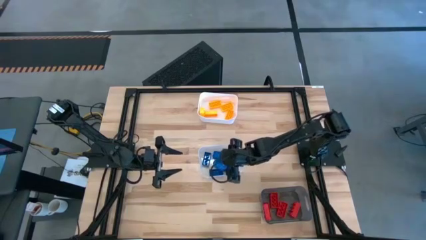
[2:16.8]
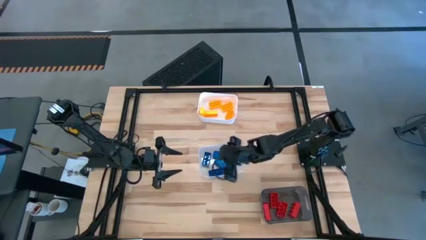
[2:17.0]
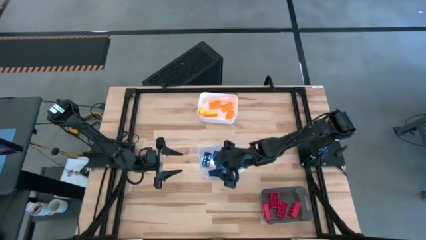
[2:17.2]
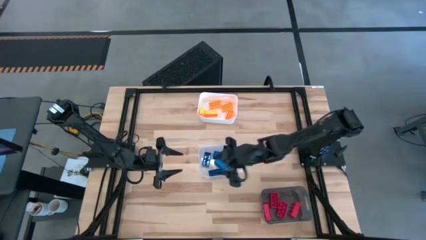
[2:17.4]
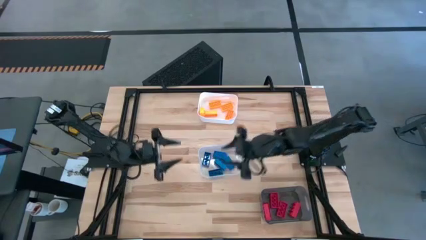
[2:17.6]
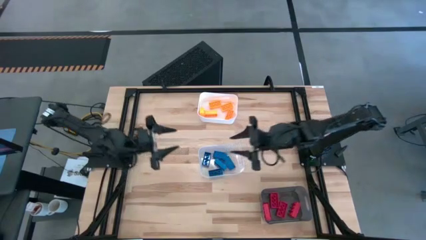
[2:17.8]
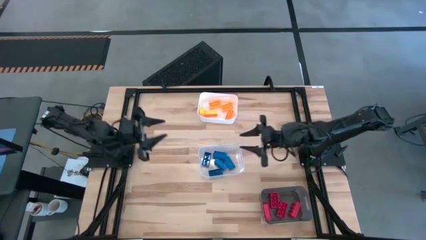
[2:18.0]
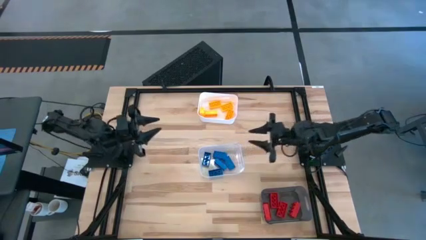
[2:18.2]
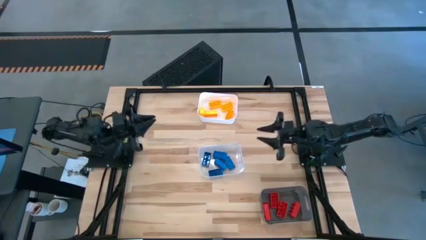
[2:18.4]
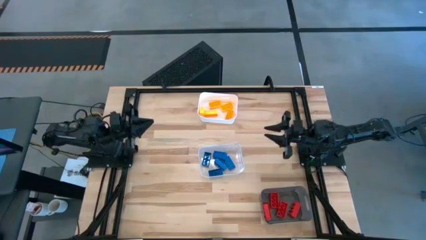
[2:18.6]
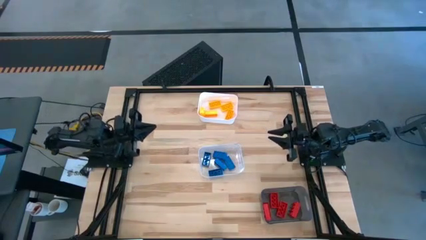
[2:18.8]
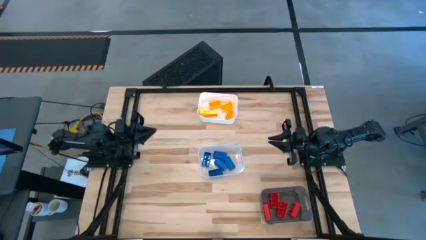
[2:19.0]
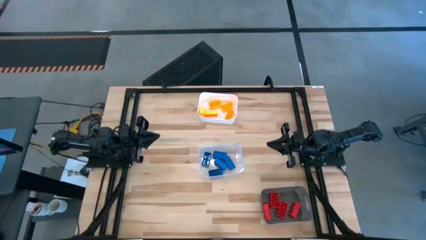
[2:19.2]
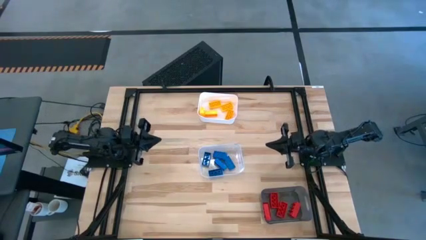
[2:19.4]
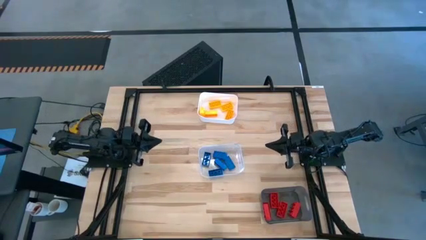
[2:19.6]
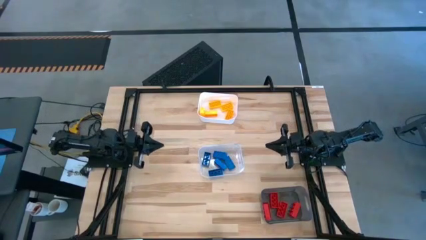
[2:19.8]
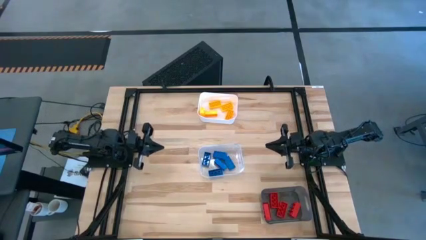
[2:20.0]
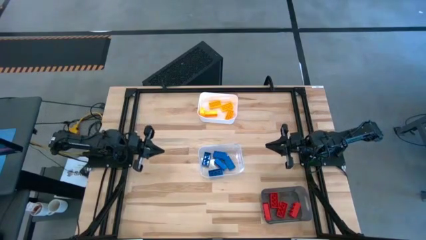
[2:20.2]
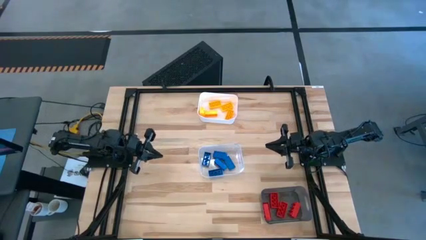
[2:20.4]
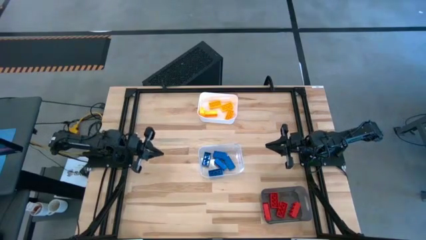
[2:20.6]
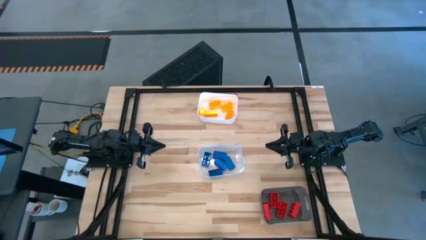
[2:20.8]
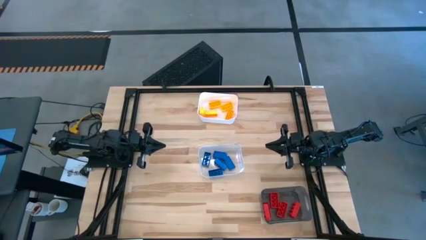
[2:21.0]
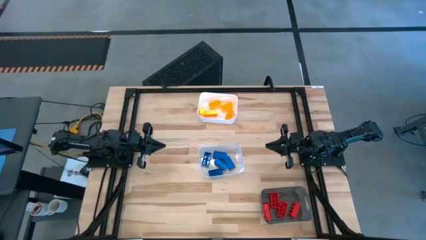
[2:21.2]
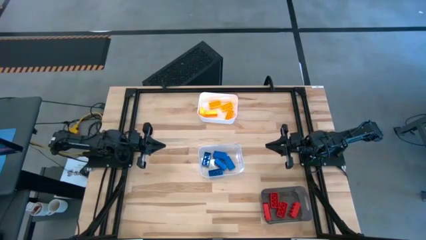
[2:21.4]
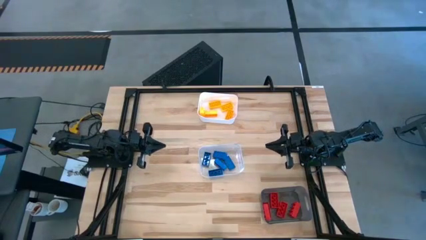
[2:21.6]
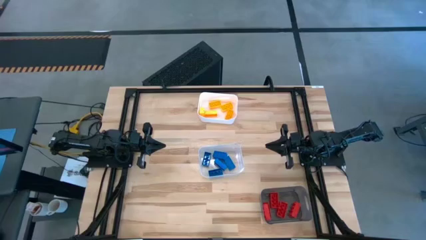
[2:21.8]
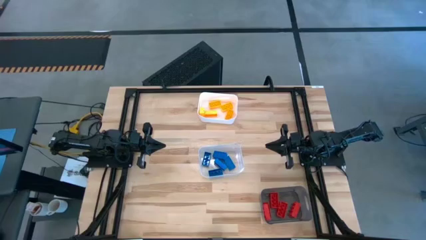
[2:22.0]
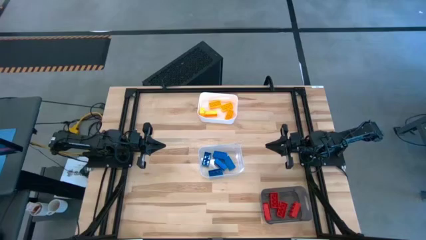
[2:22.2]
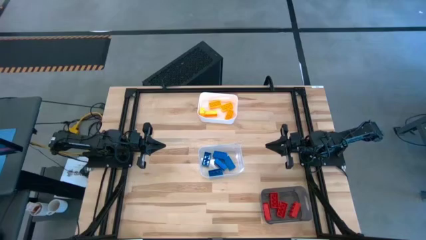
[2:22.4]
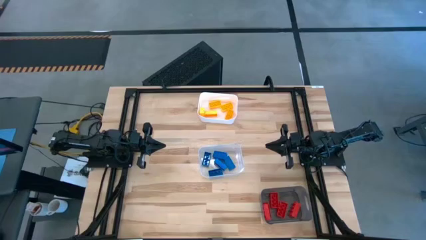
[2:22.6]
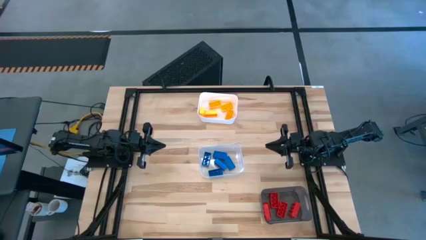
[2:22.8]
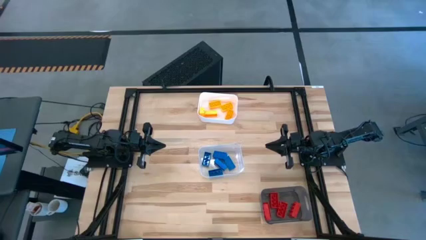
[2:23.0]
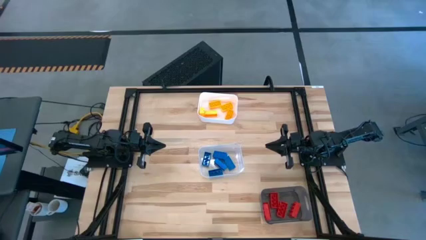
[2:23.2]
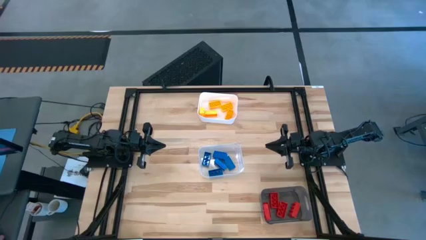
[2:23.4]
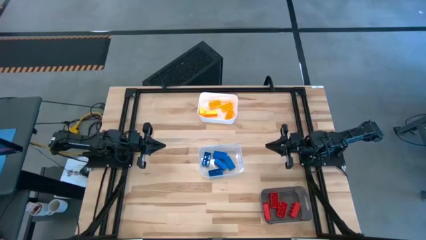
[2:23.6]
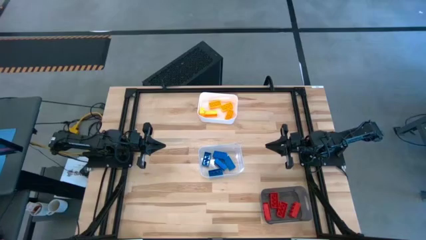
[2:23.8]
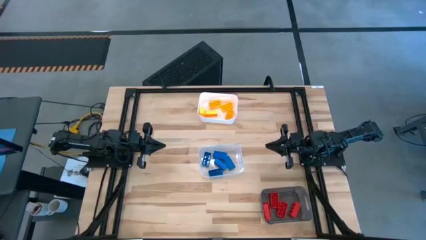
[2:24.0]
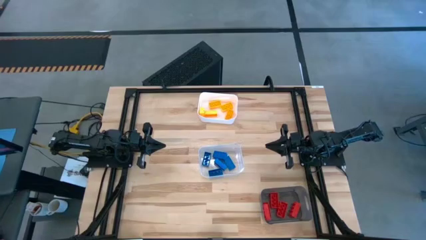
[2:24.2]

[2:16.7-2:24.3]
Task: Sort & place blocks by color
Return to Home Position

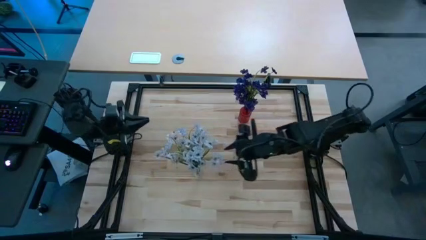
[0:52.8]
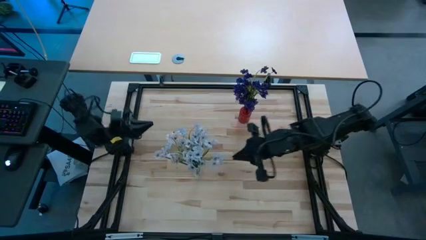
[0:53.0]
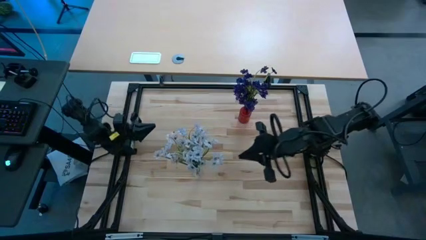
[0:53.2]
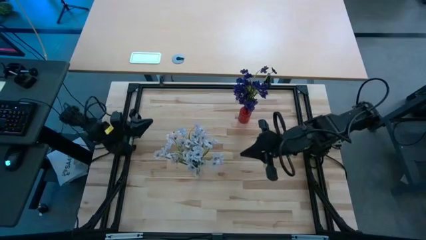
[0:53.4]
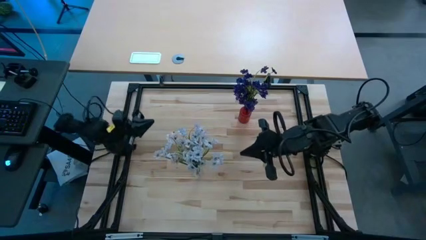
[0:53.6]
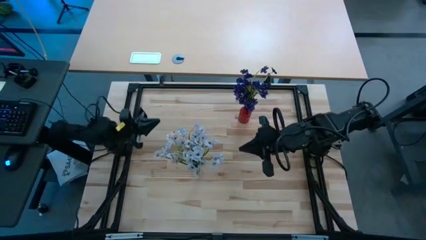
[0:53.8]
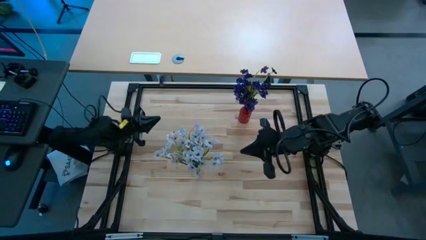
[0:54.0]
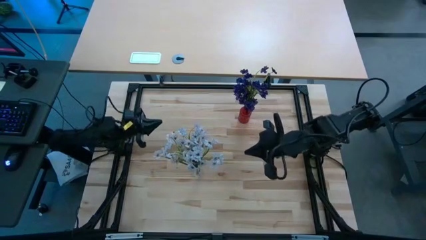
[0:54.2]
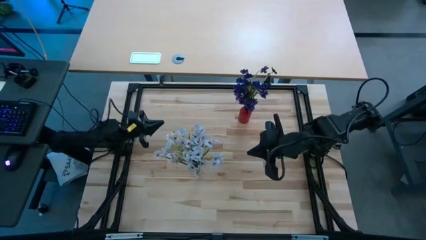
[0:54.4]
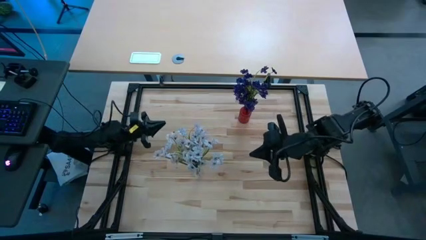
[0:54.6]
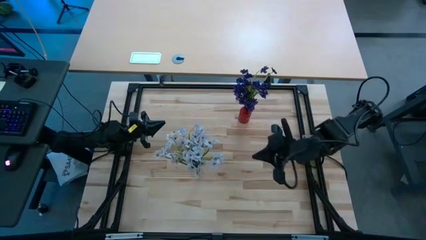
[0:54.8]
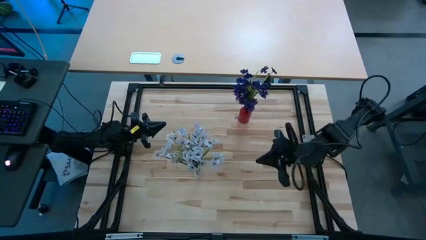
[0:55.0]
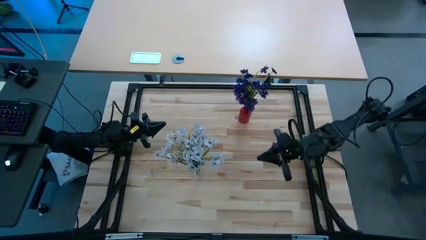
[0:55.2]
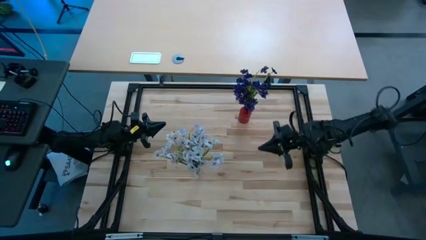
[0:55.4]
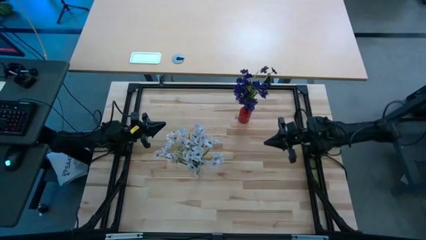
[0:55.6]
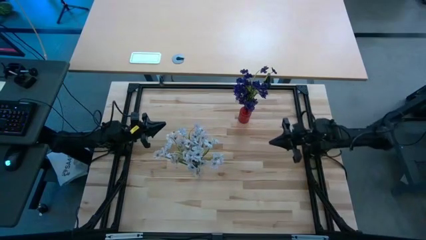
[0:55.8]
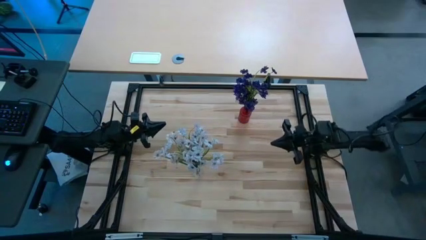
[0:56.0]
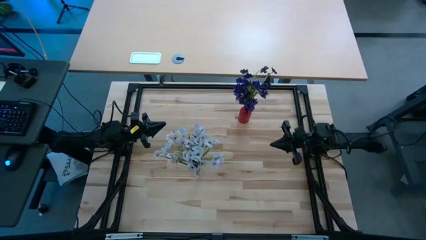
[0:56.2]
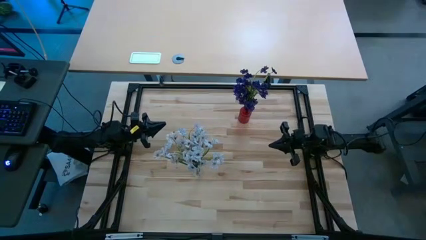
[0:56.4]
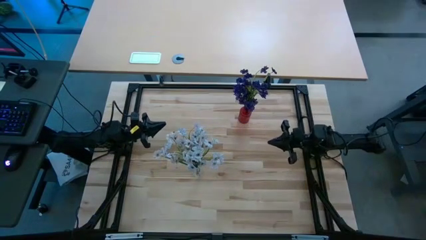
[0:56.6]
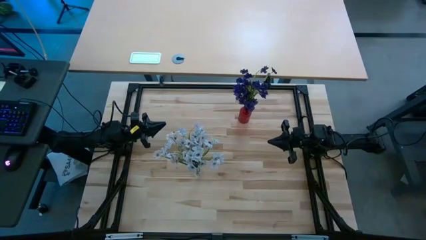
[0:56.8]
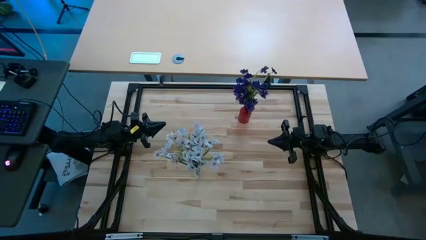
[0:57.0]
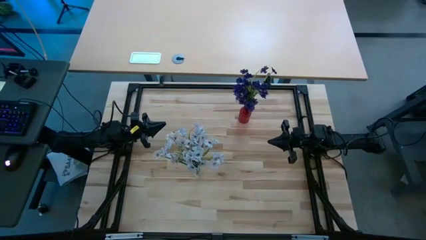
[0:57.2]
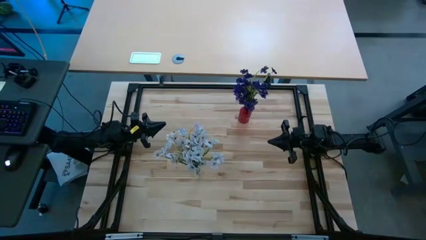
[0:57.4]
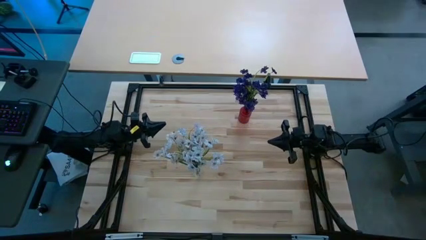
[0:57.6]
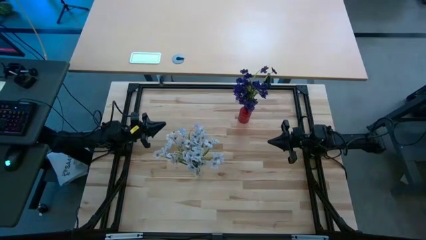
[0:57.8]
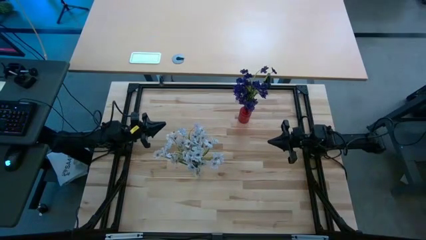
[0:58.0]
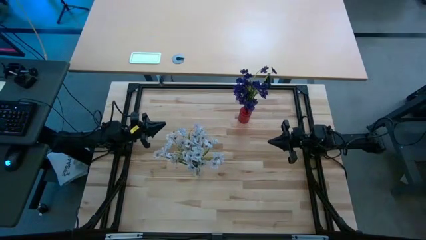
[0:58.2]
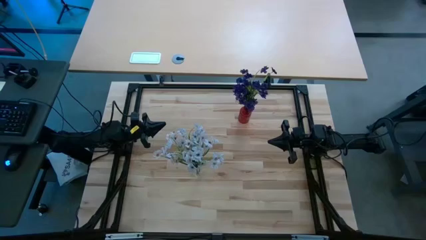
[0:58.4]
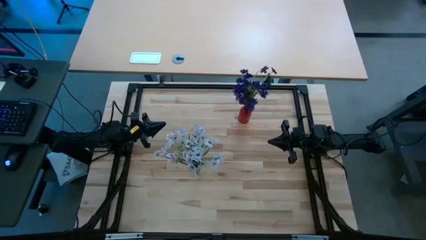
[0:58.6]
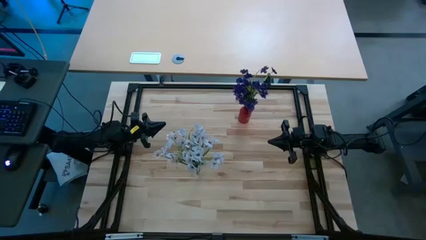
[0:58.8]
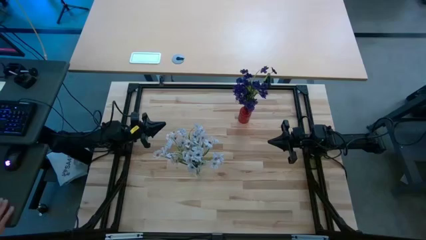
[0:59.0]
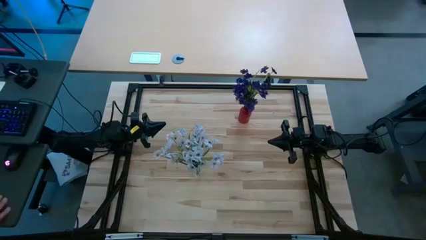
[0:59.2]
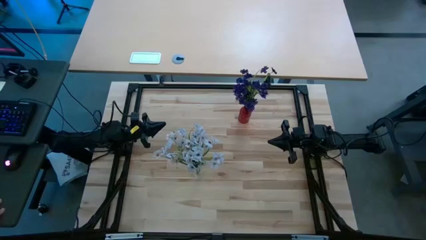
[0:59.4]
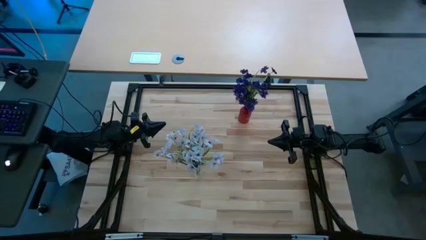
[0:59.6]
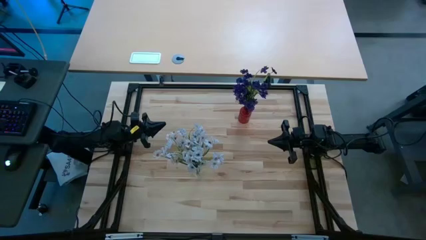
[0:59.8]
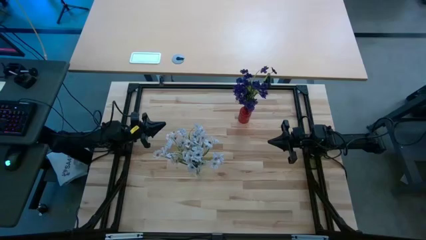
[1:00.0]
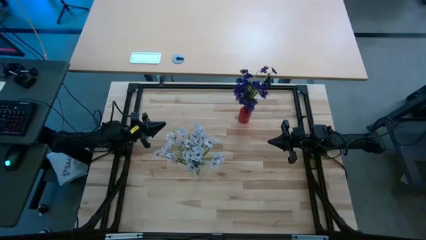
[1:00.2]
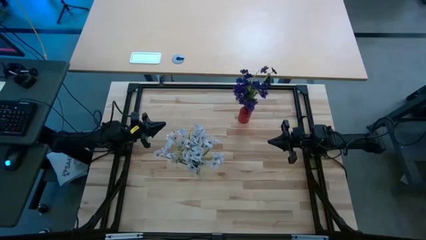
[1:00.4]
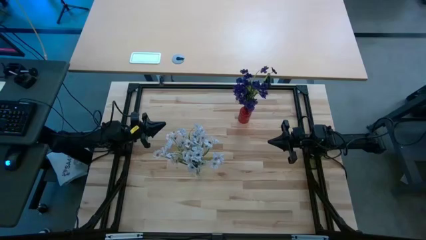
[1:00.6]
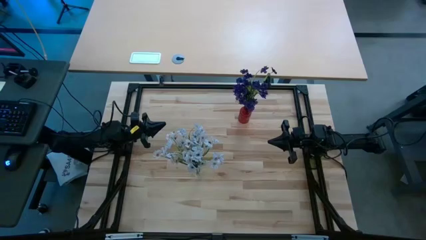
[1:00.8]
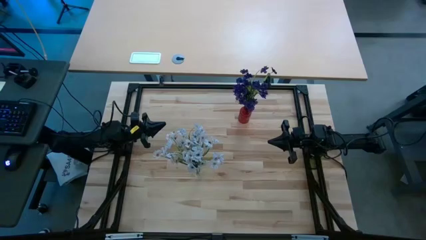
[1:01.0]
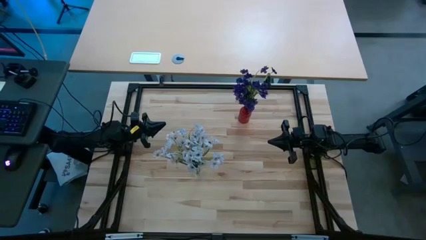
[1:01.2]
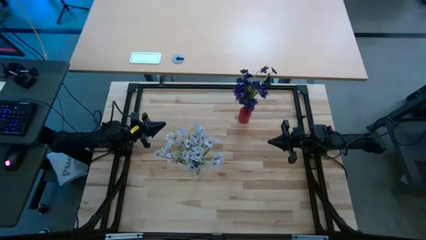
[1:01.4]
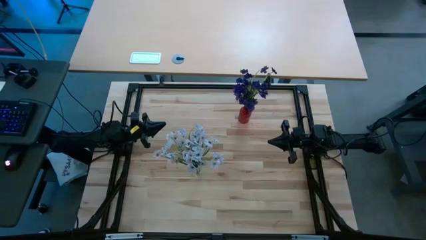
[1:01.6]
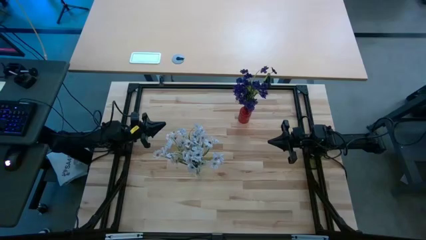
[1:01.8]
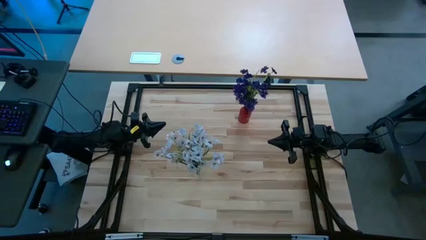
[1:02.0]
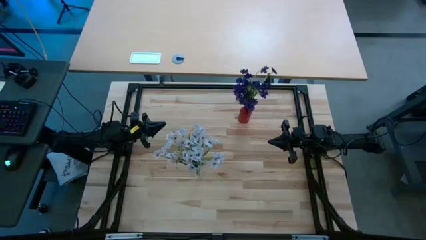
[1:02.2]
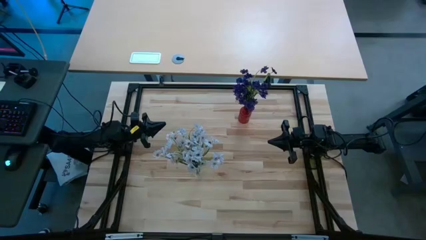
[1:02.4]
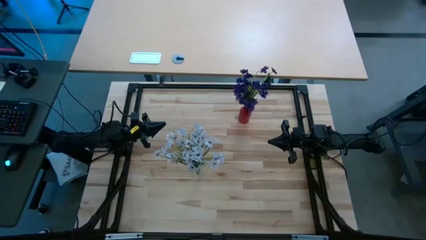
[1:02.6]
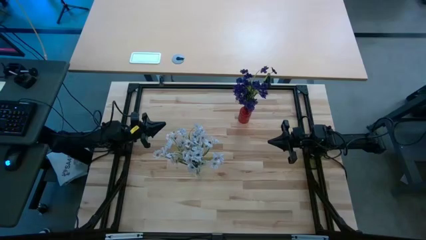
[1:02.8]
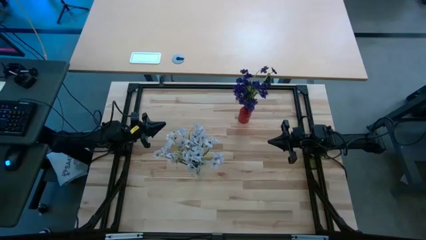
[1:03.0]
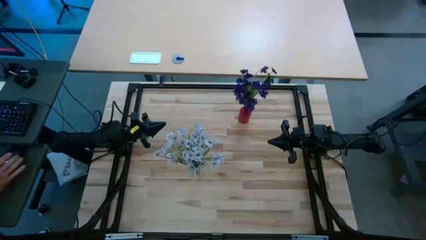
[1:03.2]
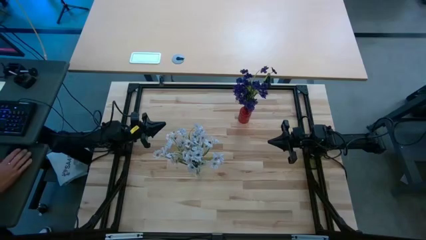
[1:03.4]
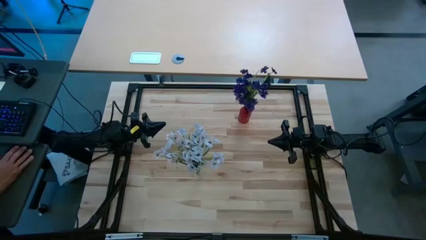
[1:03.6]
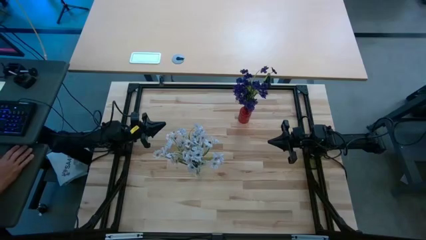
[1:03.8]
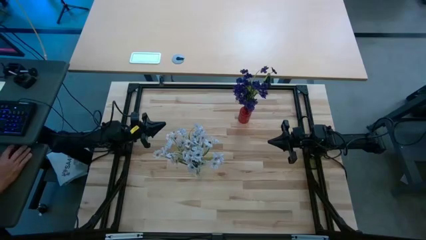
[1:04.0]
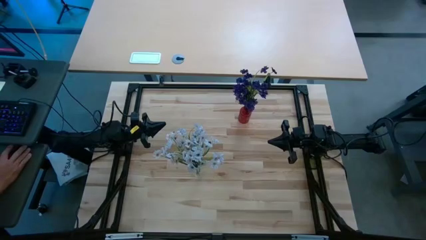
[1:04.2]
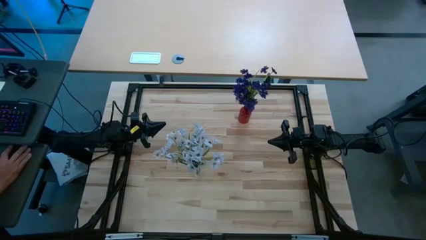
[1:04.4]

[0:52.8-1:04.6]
Task: Sort flowers into vase by color
Return to Home Position
